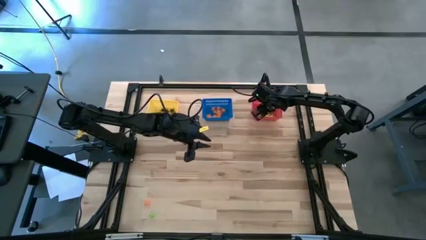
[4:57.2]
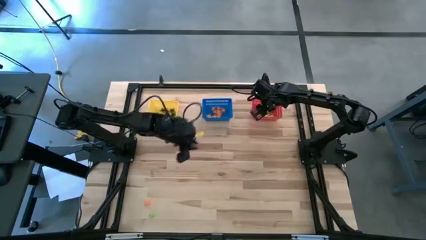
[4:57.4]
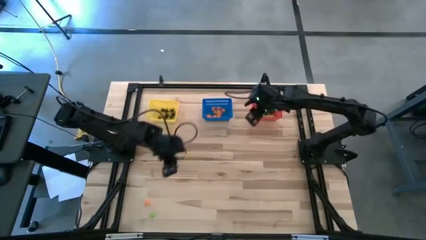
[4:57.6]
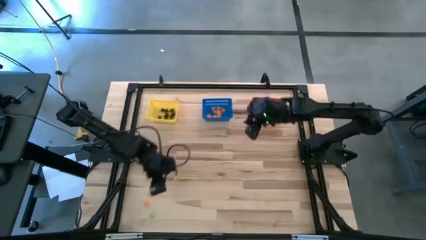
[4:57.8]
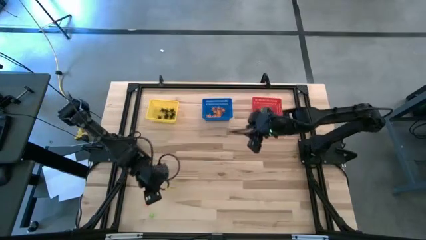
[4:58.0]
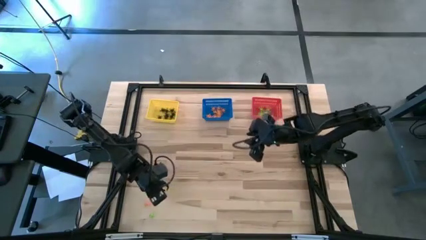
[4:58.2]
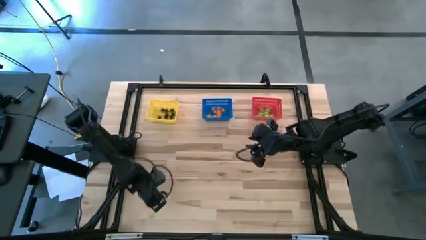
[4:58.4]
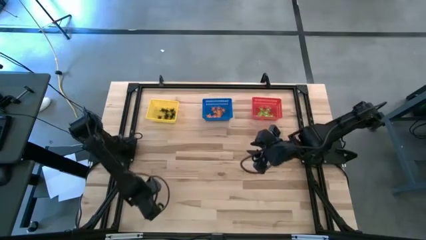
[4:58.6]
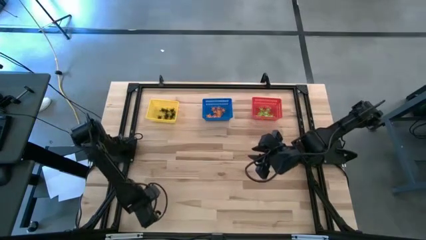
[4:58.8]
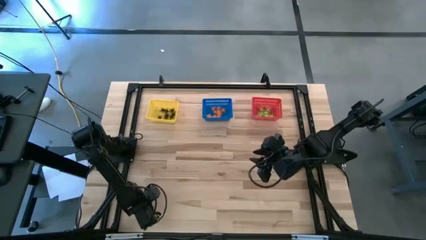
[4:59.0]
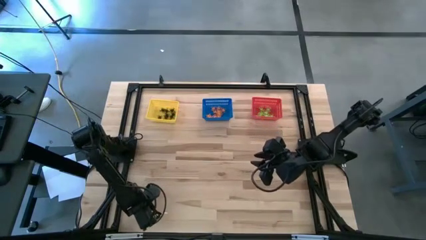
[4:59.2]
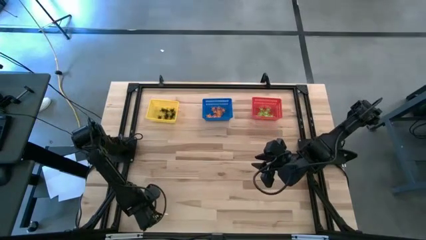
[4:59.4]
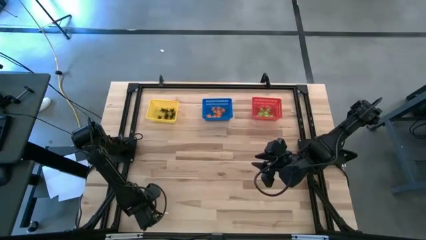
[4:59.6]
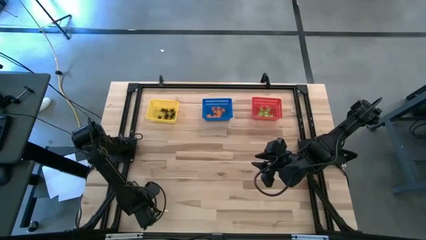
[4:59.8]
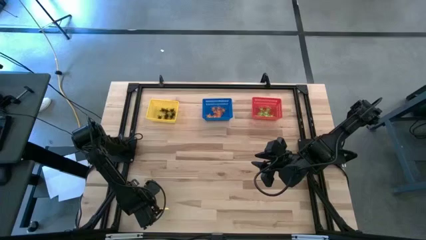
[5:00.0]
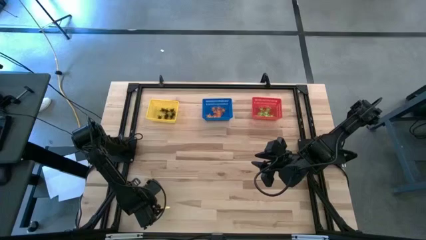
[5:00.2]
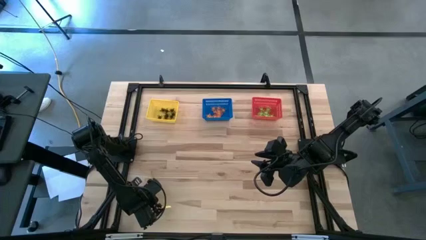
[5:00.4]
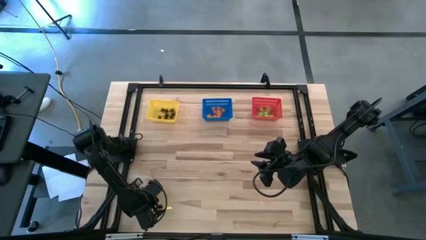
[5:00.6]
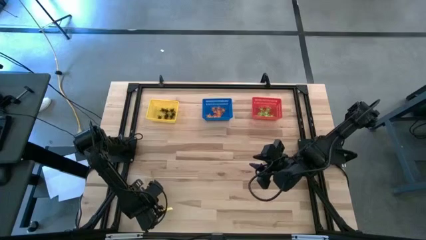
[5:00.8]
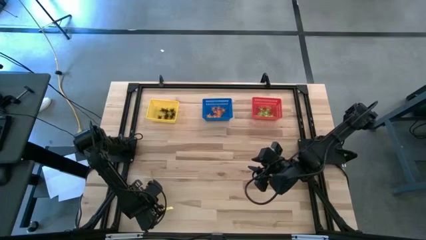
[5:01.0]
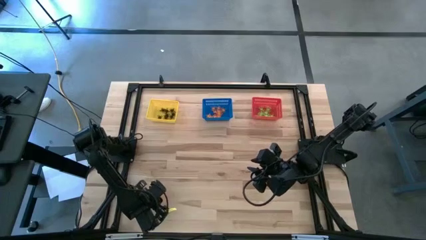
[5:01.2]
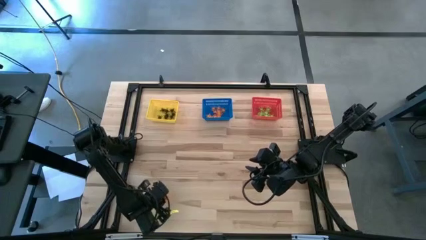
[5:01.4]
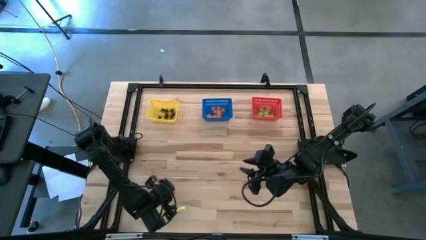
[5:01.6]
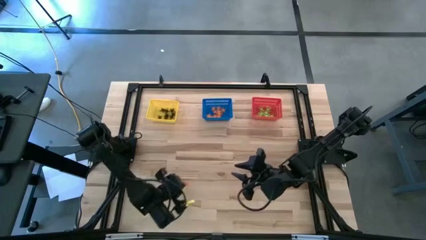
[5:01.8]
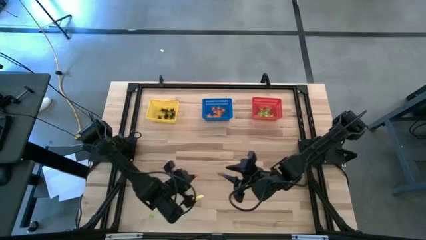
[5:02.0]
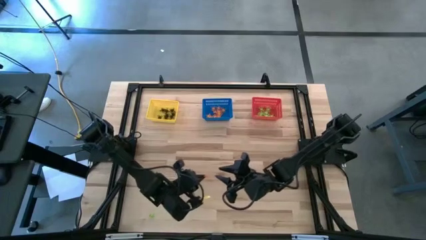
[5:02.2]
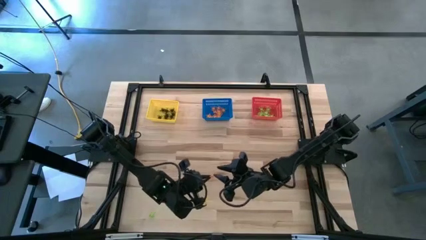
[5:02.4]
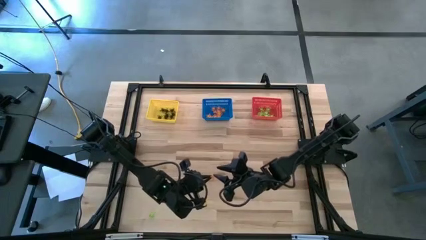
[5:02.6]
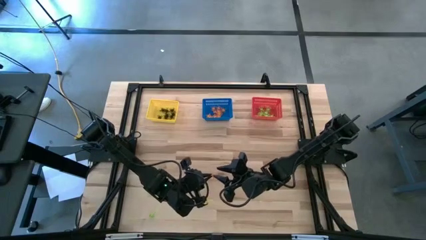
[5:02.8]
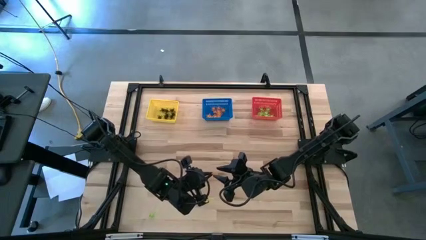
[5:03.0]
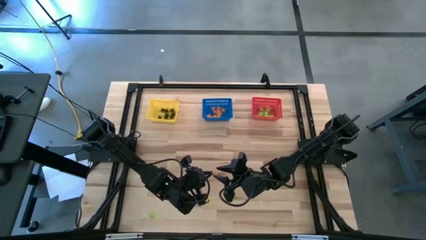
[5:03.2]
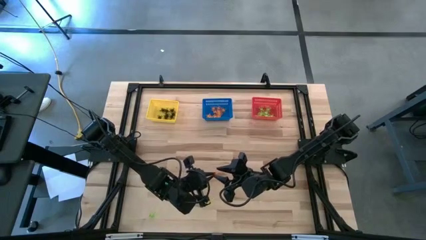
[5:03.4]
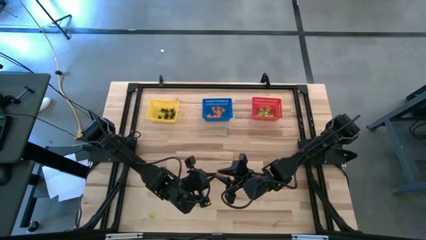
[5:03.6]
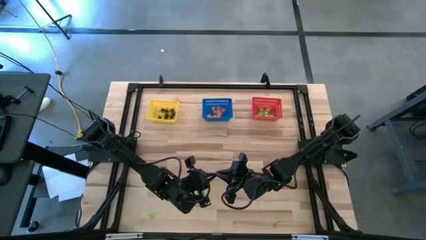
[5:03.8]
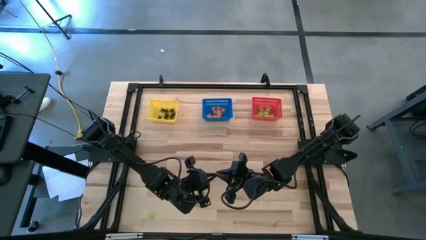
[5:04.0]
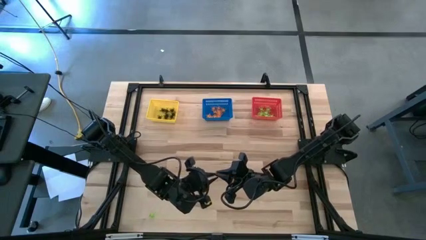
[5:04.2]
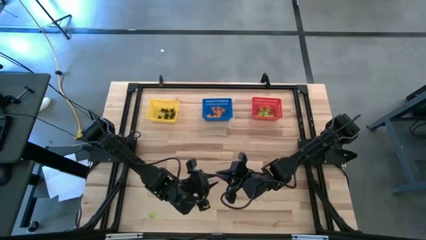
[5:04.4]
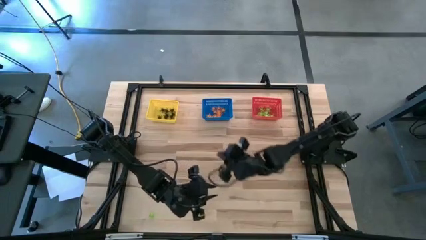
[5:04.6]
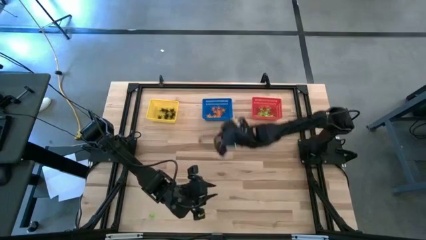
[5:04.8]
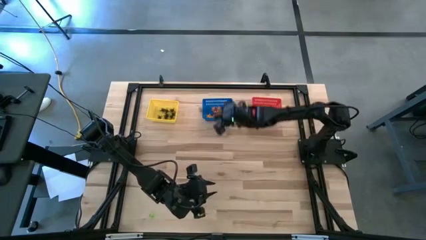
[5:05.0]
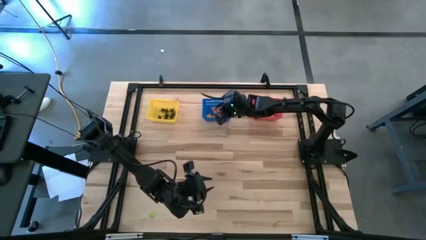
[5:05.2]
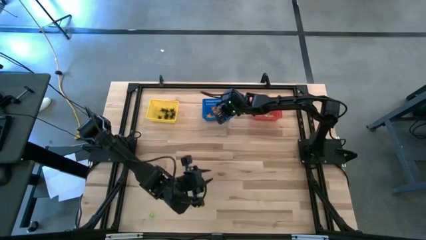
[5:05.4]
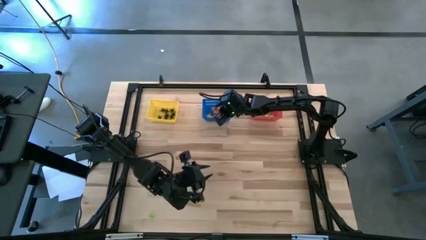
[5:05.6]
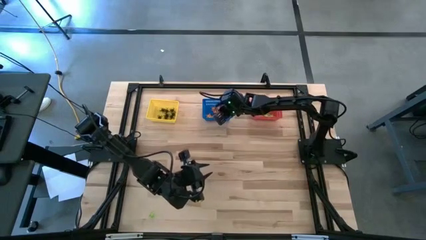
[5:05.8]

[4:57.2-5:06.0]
Task: Sort Halloween decoration
Put the orange spider toy into the red basket

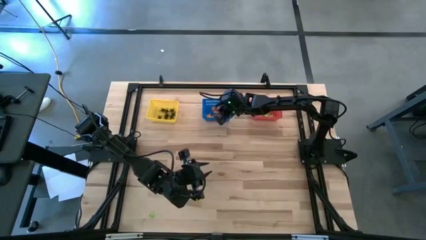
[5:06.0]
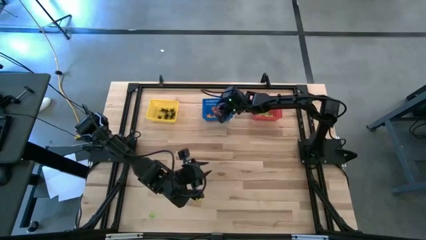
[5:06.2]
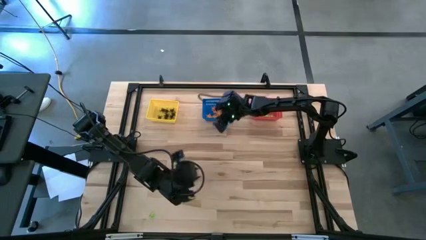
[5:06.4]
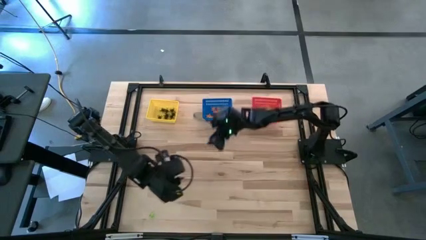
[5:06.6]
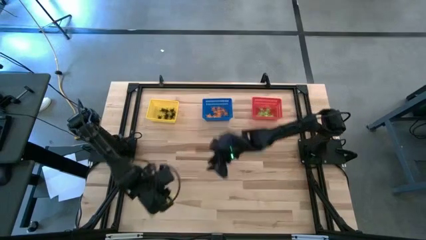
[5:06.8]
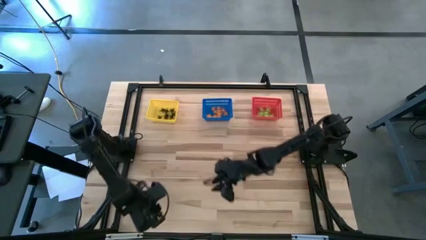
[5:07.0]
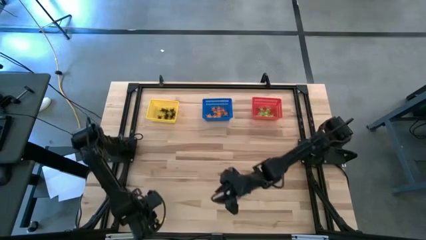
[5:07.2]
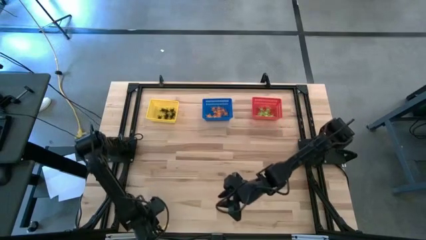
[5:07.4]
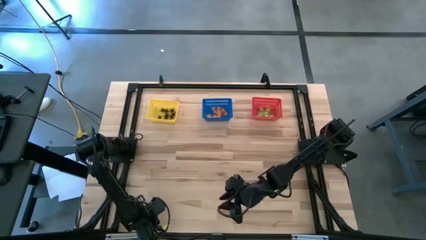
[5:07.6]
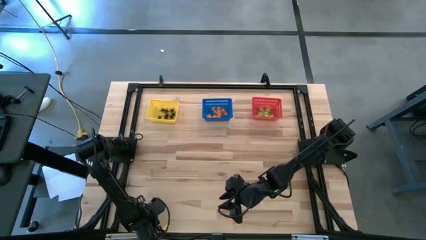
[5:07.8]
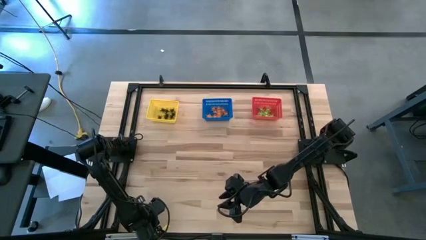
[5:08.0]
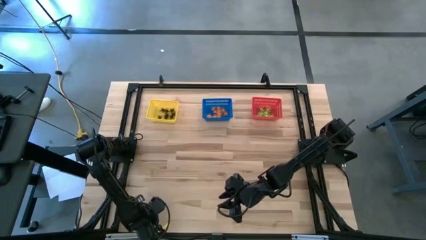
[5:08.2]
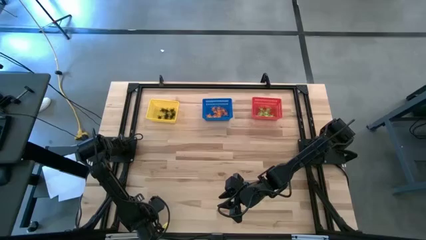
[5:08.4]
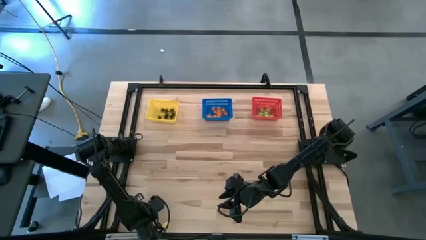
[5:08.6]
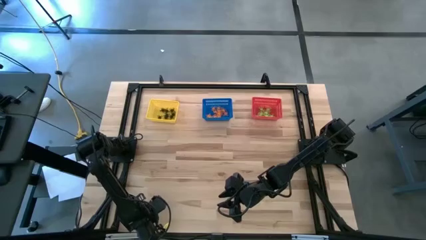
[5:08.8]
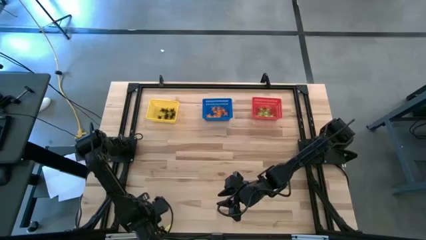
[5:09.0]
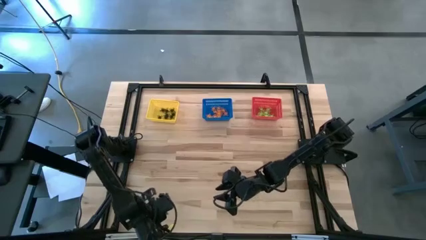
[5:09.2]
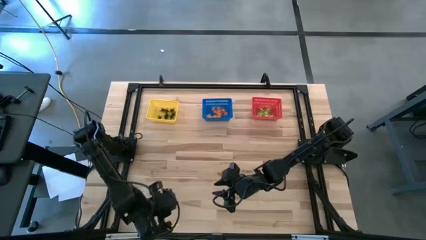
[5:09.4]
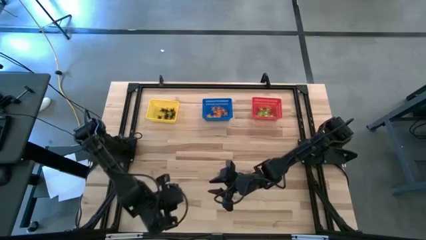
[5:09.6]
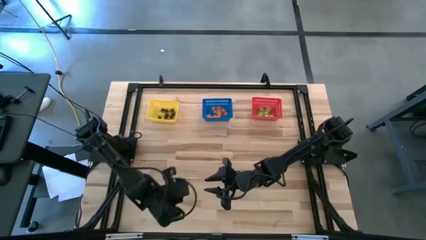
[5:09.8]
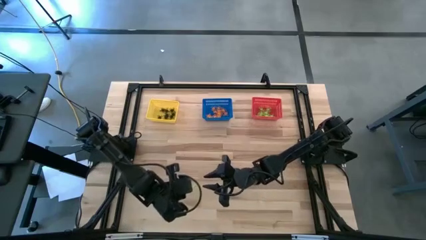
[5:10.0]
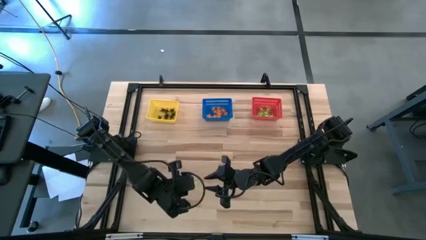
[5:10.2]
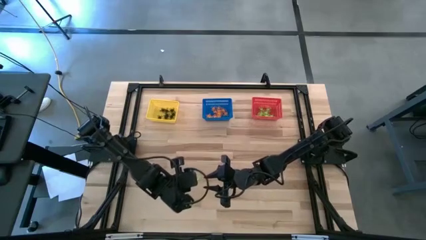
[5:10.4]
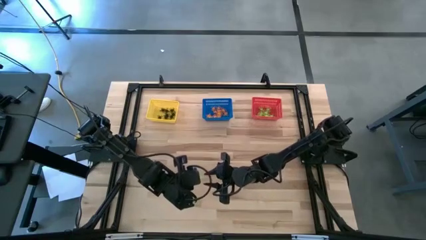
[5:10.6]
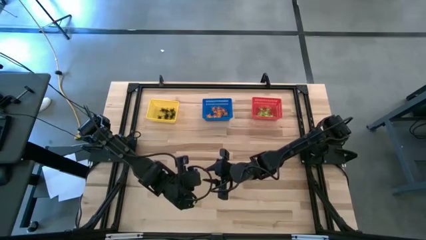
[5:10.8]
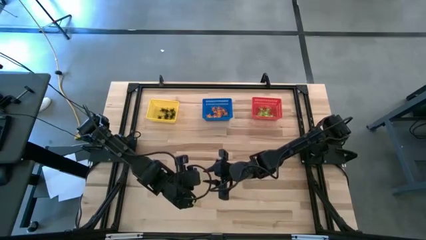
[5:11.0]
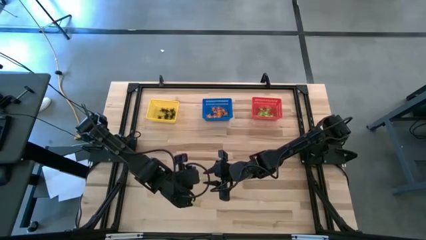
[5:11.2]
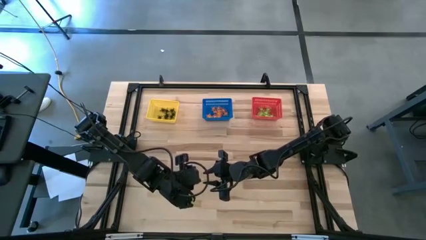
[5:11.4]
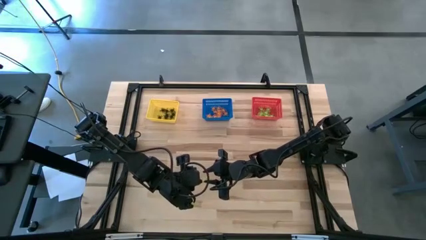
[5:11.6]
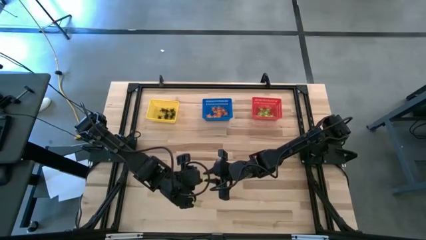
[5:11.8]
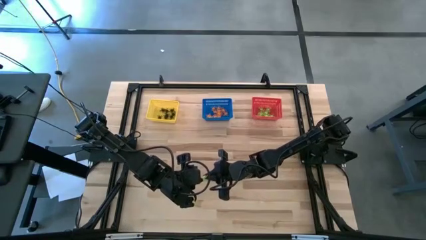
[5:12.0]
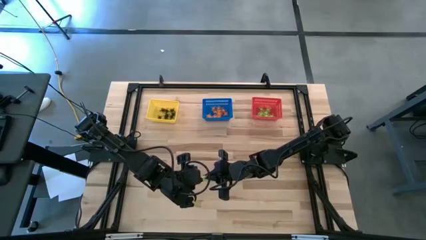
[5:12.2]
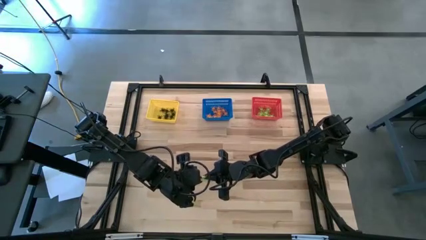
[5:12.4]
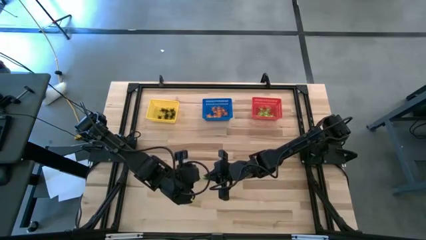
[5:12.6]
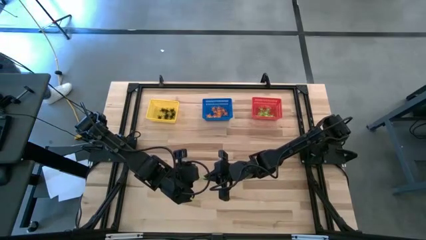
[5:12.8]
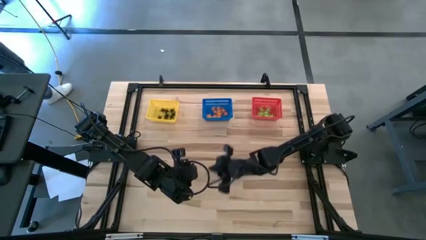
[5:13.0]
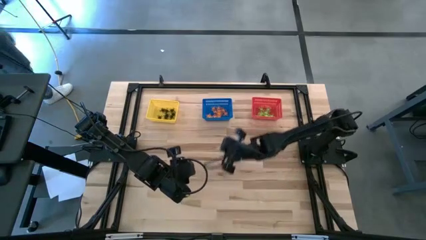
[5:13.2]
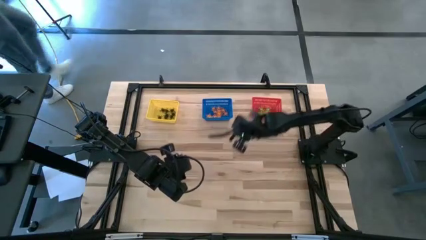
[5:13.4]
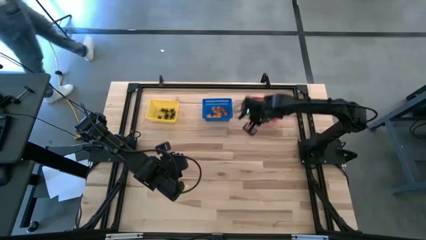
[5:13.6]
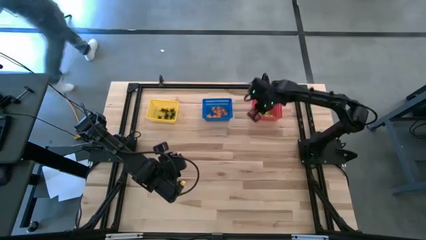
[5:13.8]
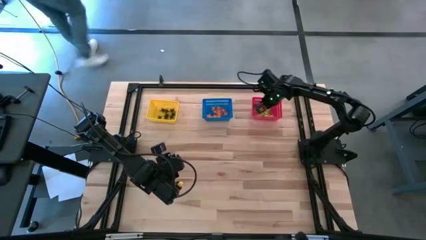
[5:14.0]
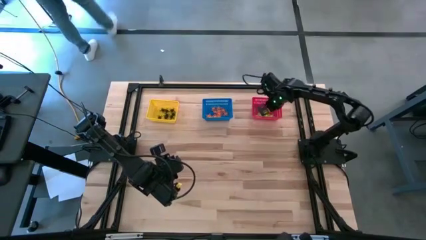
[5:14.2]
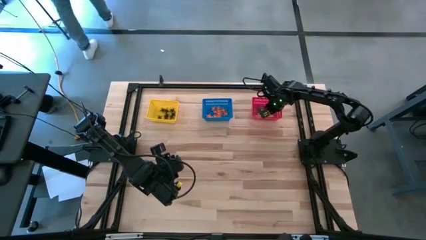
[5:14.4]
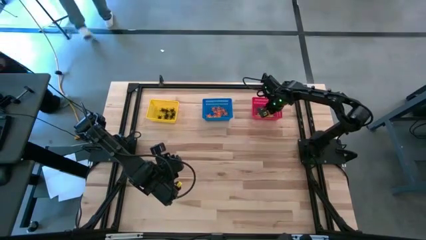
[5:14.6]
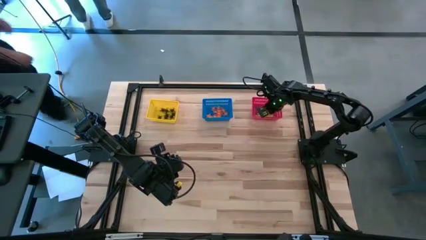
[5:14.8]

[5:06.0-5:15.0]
Put the green spider toy into the red basket
